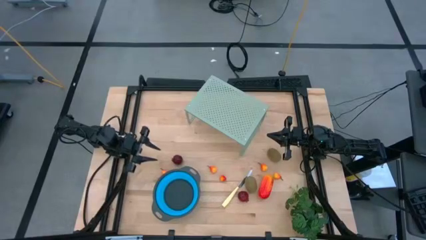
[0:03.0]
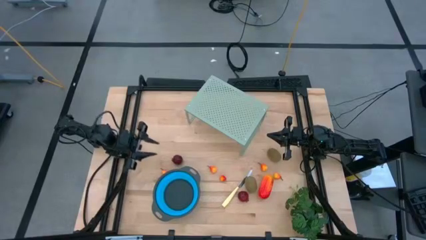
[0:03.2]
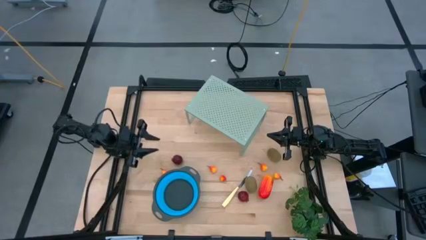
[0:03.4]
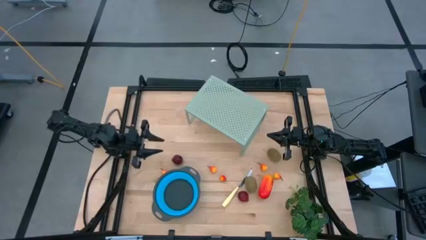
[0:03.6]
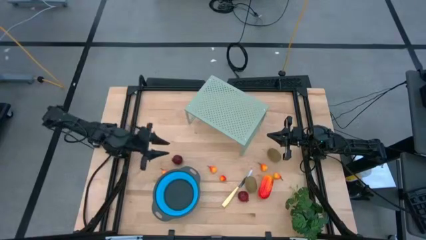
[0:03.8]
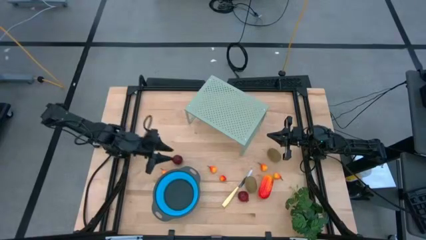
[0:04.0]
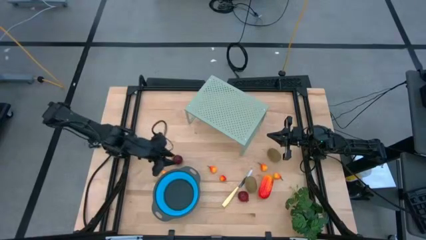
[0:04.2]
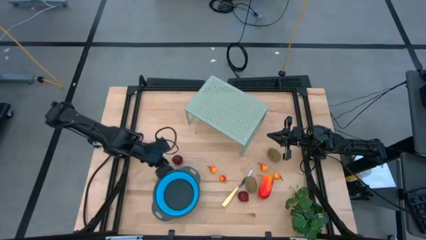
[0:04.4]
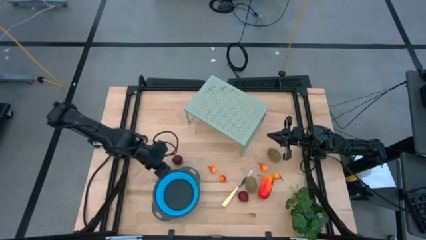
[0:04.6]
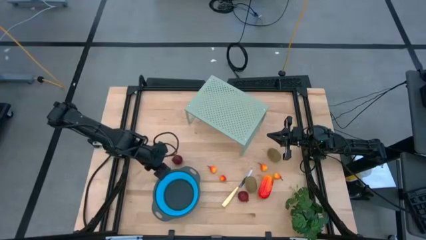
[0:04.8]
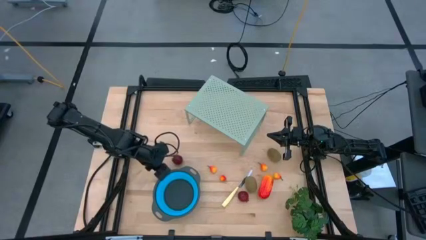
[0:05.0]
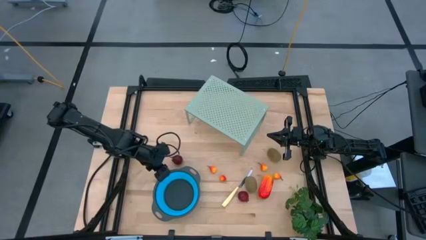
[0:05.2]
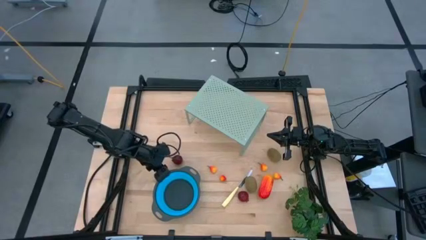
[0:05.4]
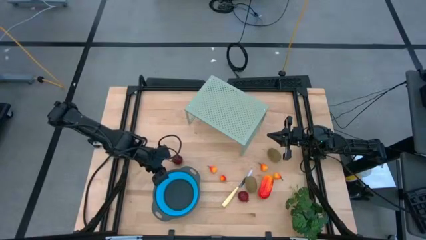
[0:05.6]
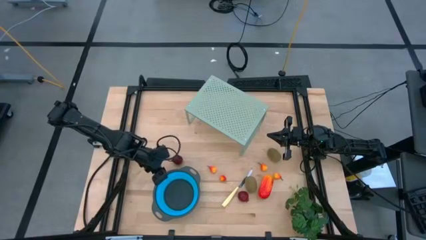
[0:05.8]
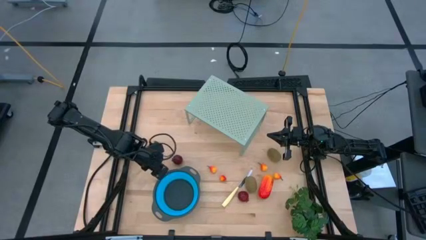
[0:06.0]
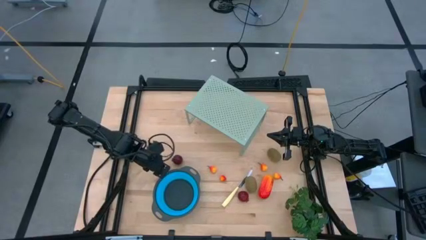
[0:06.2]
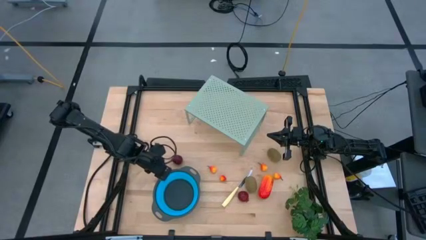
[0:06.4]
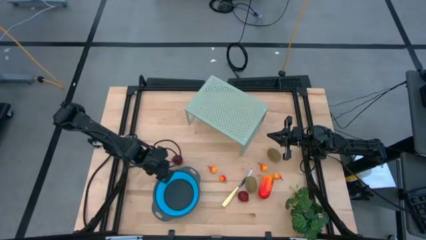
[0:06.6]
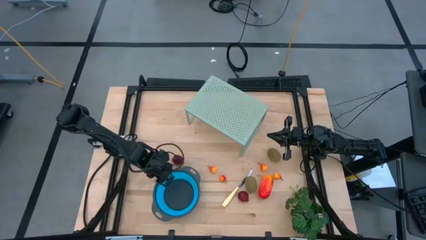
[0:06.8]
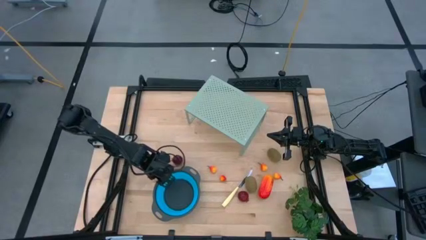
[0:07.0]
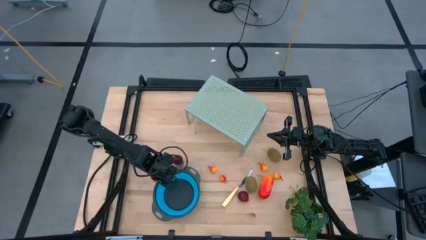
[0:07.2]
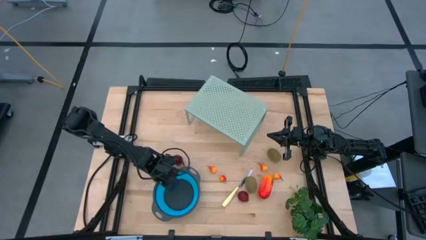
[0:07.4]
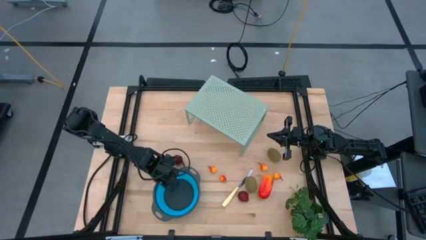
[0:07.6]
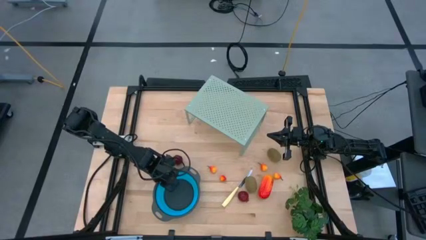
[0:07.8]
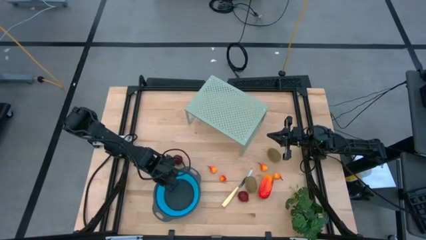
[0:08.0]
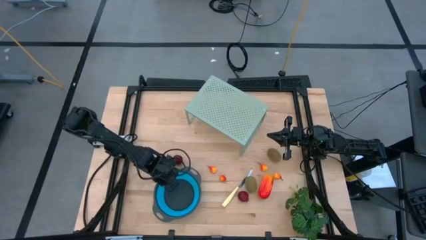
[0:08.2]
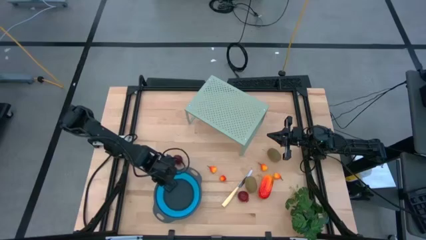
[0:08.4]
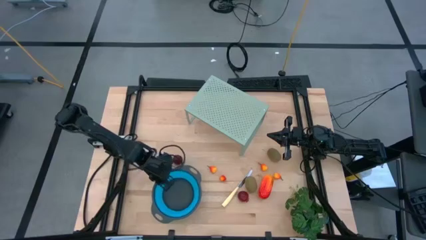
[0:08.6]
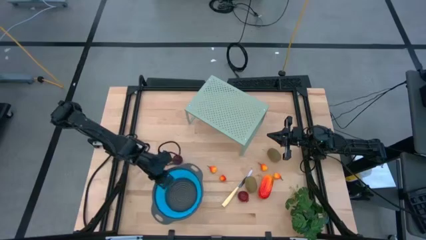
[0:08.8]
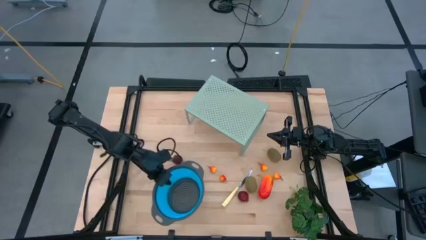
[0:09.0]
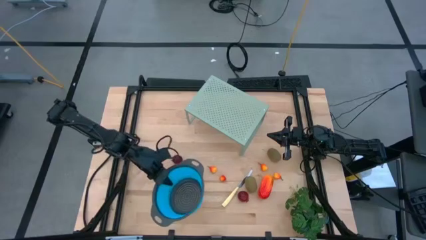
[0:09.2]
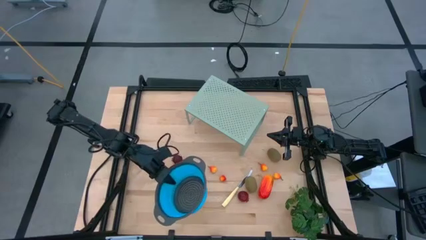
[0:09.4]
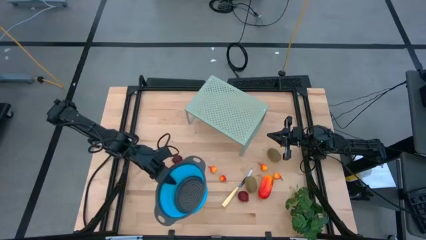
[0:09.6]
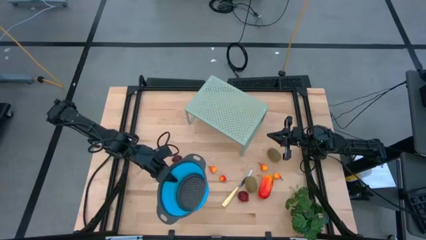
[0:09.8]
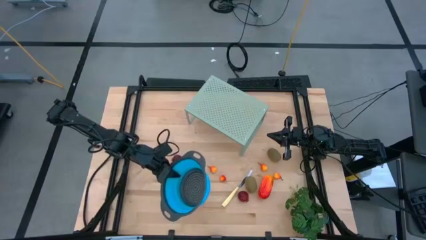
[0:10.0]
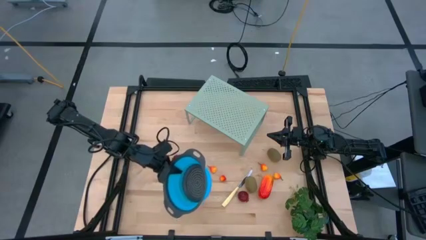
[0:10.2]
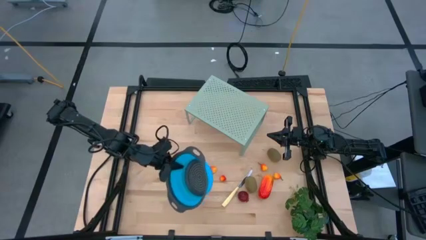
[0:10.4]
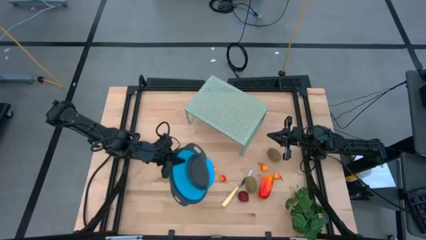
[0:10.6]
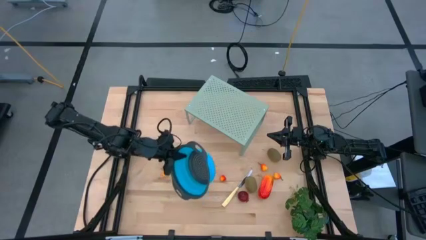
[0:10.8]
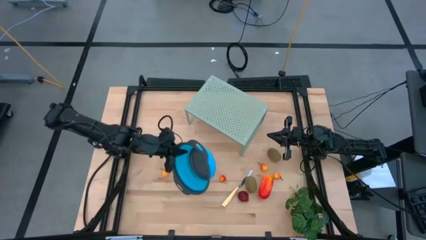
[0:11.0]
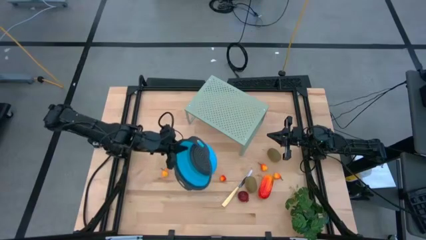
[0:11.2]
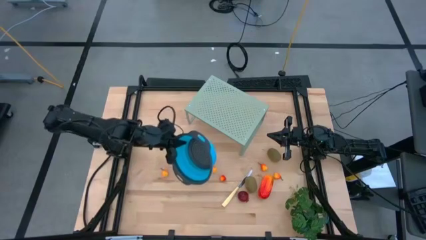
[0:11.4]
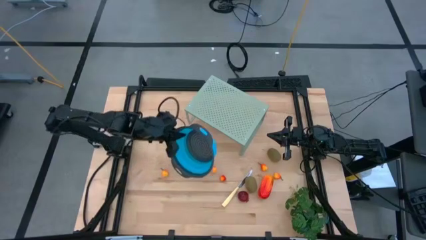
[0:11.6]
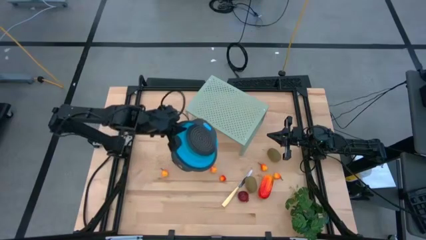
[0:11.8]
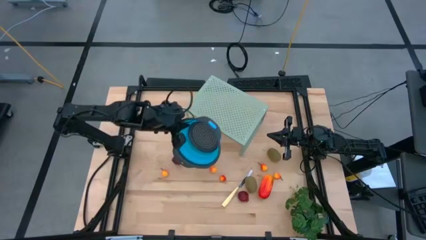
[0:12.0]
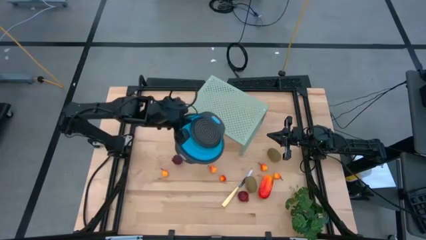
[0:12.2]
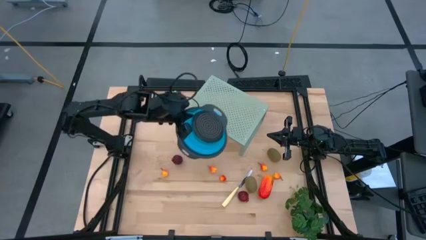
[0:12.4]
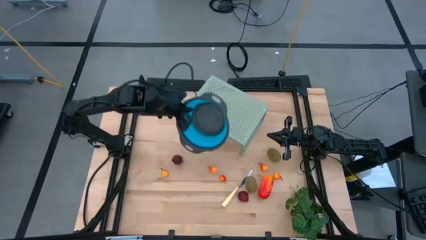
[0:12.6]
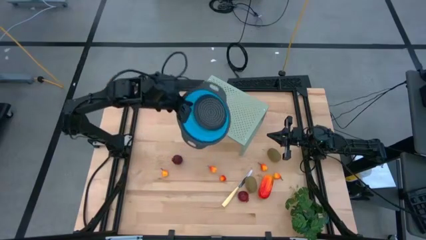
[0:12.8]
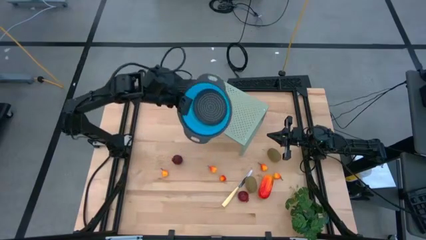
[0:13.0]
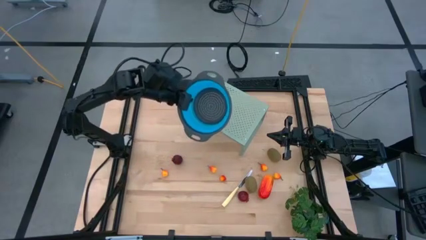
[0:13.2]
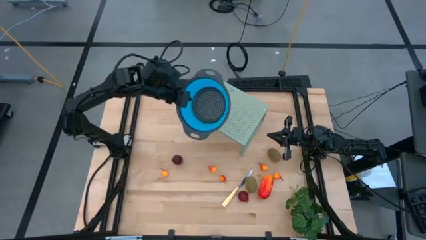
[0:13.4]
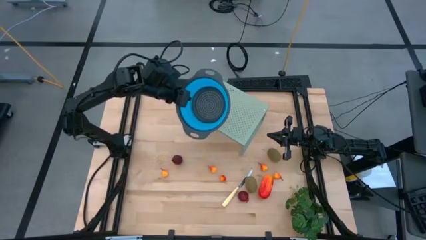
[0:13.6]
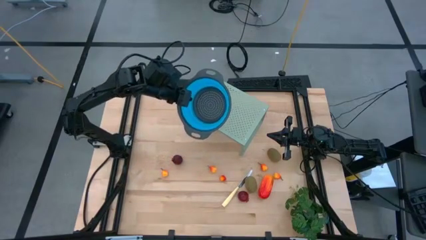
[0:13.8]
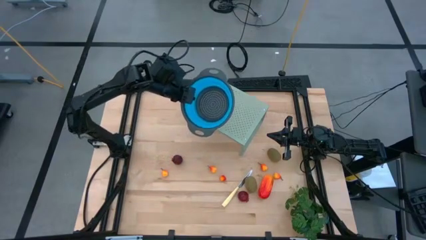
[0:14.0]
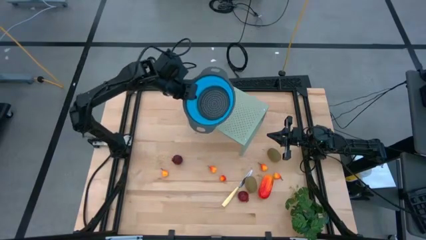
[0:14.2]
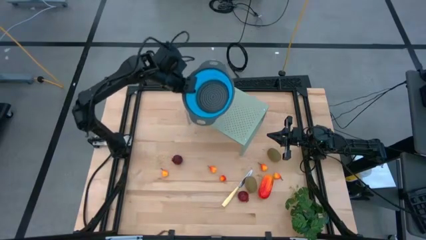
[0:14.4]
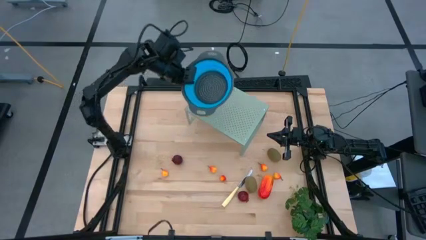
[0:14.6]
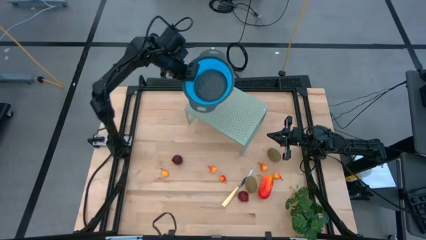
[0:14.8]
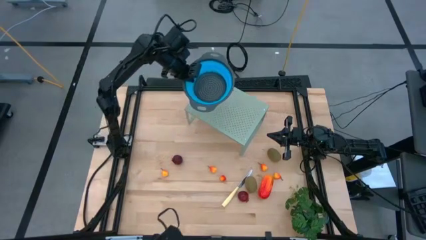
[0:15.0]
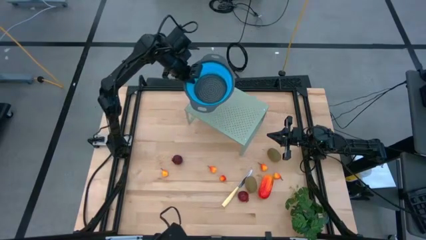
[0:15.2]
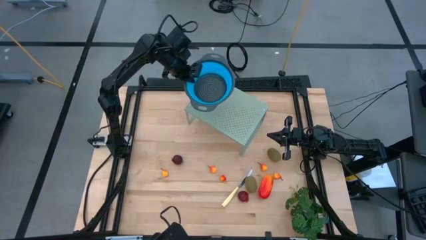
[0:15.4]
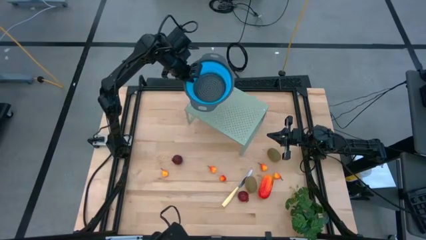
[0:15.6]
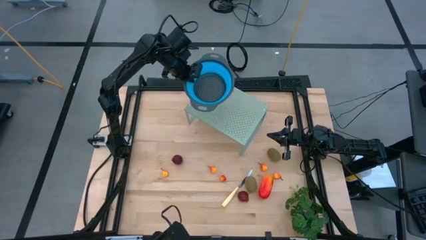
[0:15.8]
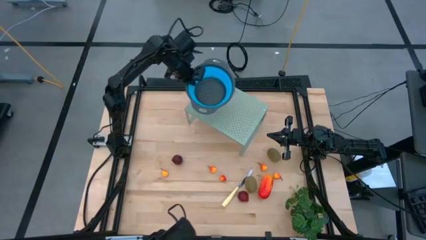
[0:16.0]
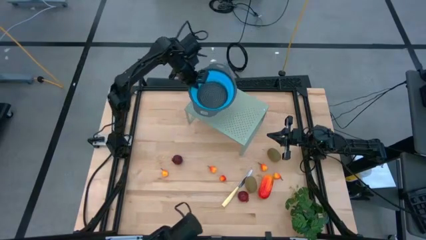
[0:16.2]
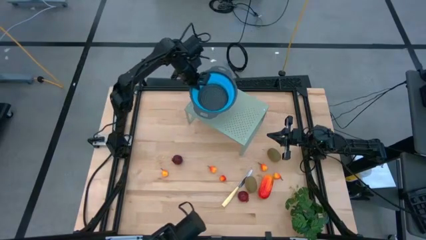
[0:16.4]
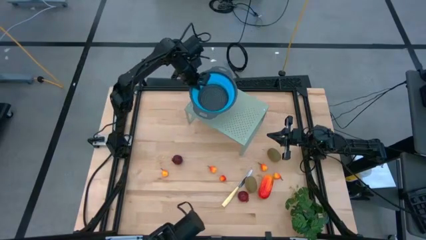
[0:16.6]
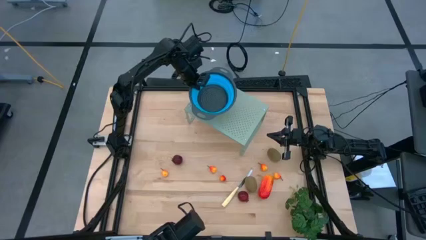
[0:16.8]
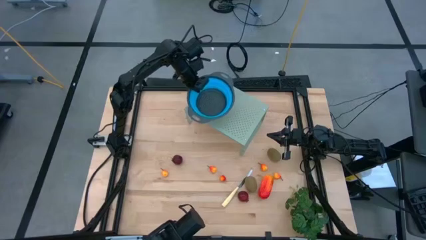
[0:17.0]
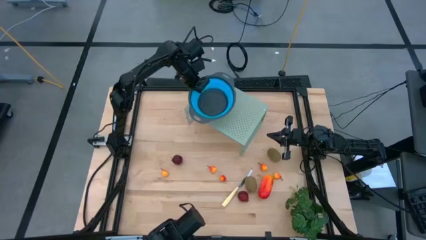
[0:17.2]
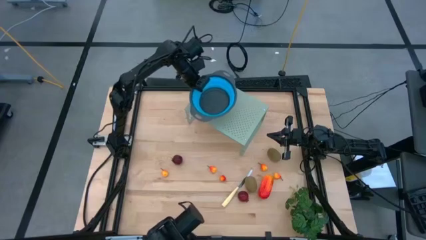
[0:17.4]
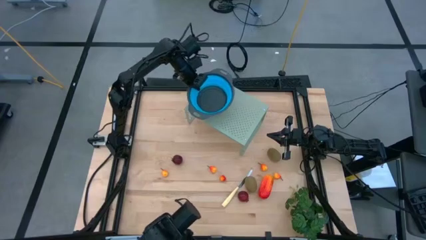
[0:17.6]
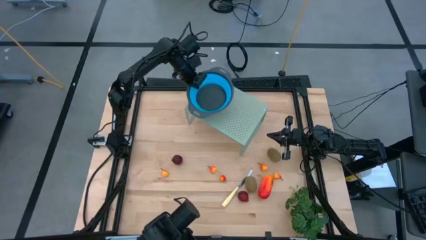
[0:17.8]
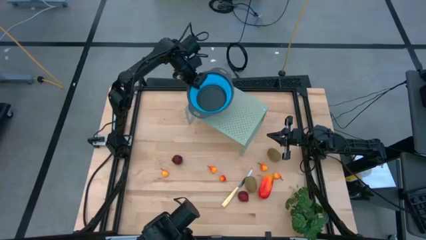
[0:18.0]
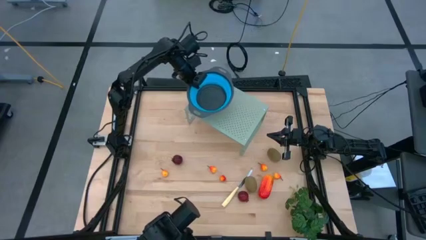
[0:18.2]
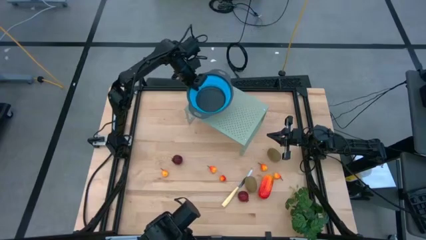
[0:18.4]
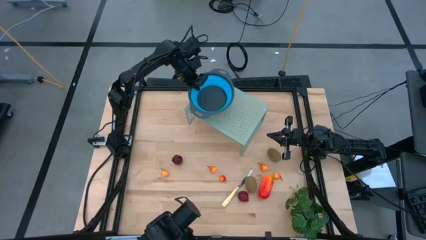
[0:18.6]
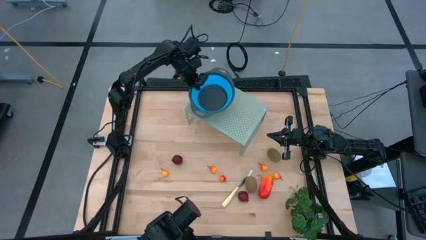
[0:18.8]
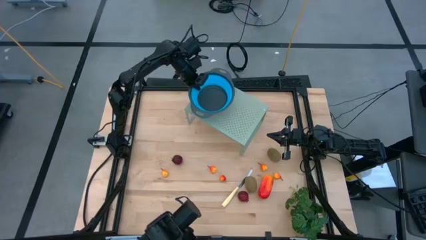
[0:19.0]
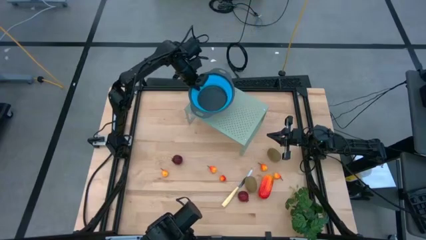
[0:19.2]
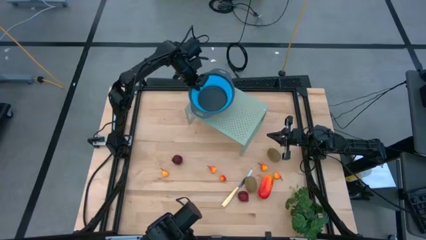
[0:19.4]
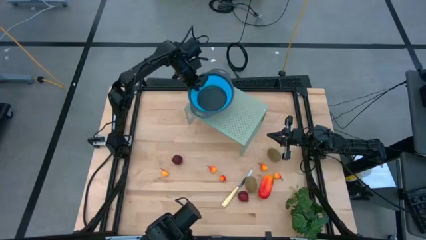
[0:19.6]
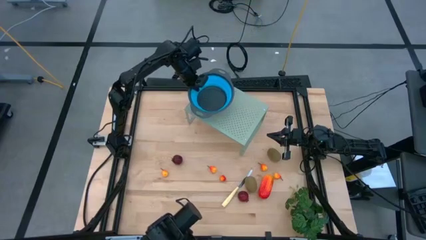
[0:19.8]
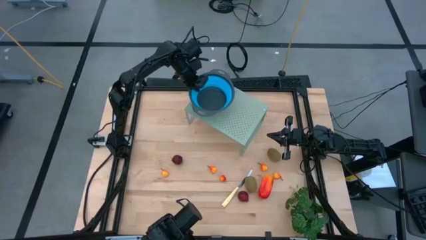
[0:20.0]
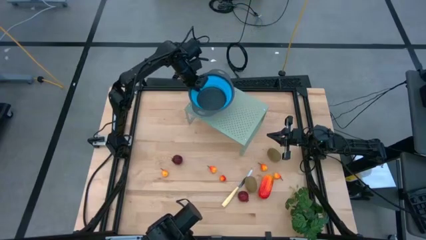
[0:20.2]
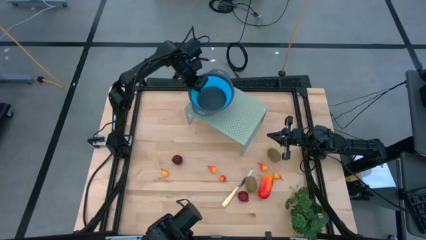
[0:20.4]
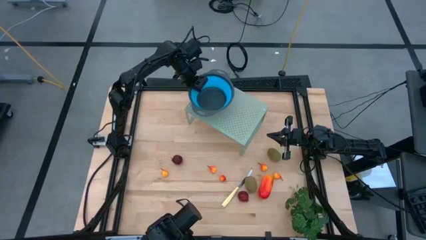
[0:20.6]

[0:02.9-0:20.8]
Task: Pick & Place Fruit
Put the blue strainer bowl on the shelf
